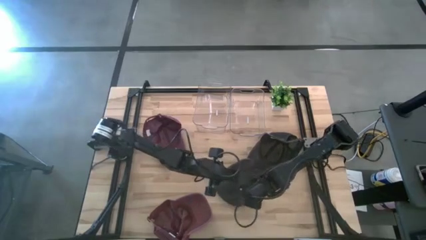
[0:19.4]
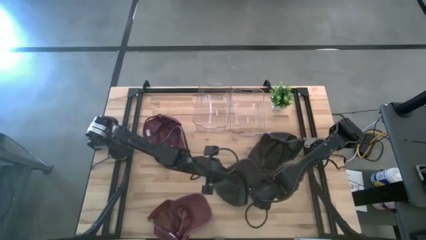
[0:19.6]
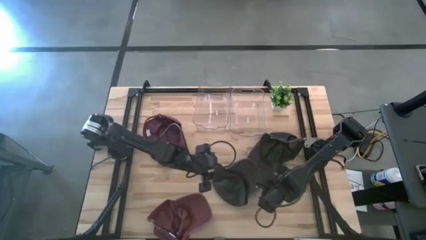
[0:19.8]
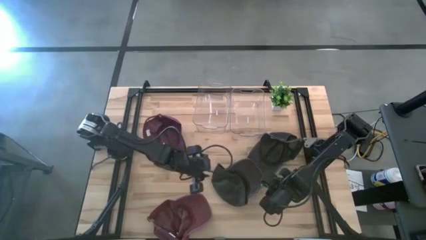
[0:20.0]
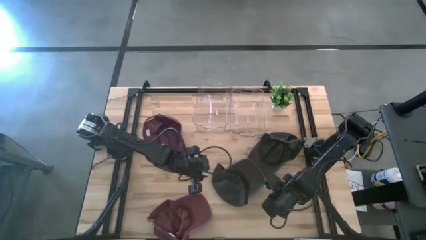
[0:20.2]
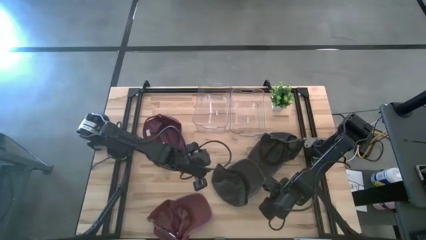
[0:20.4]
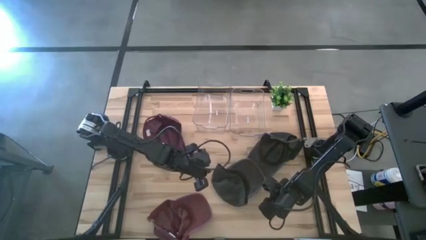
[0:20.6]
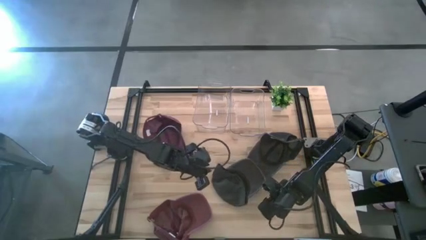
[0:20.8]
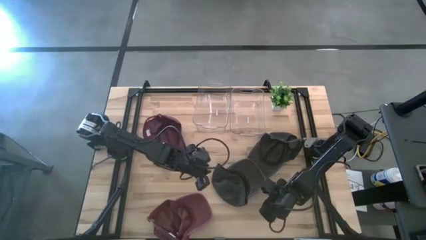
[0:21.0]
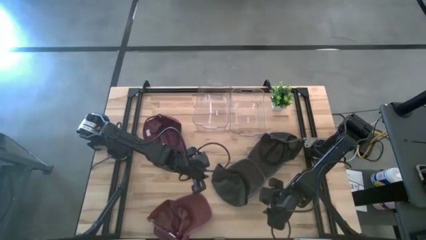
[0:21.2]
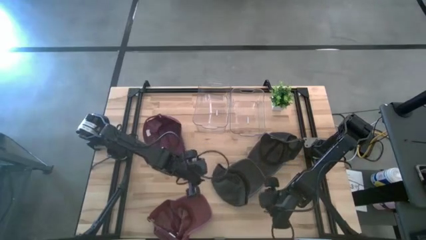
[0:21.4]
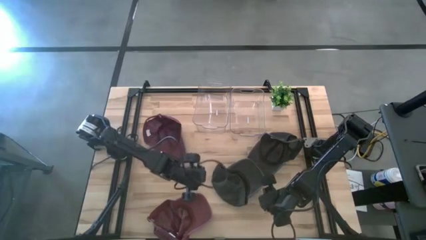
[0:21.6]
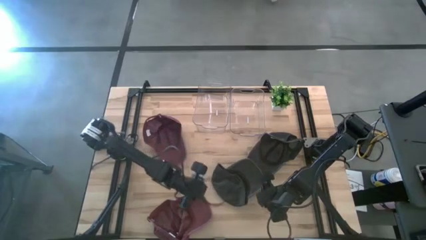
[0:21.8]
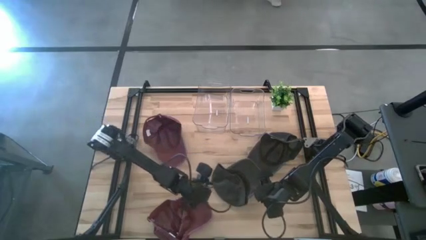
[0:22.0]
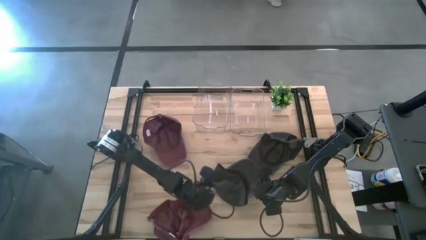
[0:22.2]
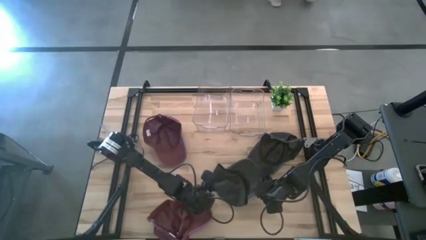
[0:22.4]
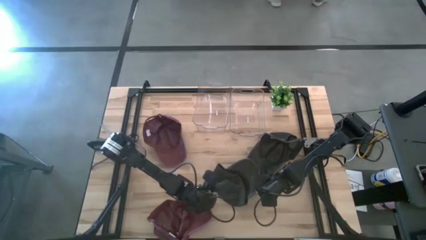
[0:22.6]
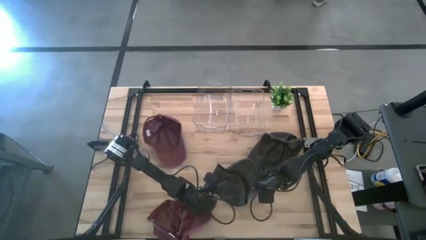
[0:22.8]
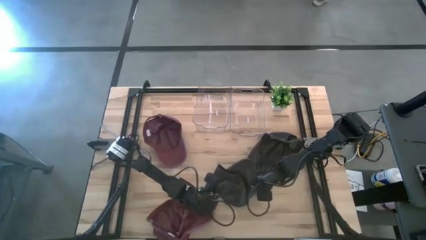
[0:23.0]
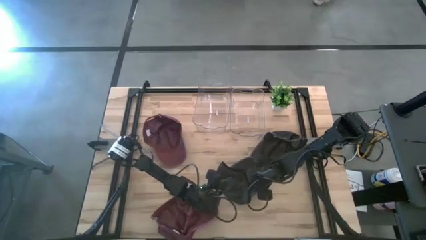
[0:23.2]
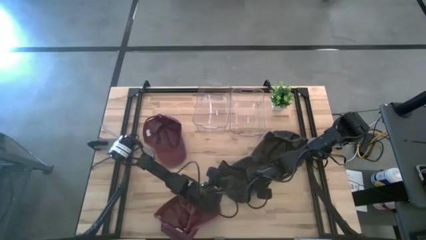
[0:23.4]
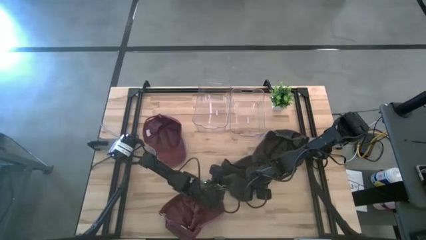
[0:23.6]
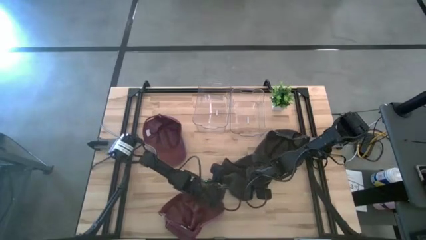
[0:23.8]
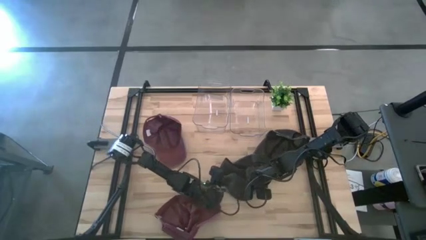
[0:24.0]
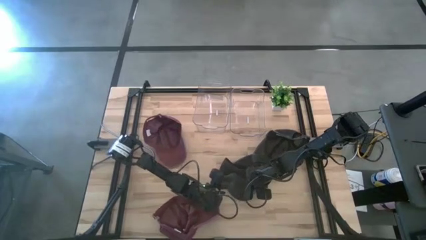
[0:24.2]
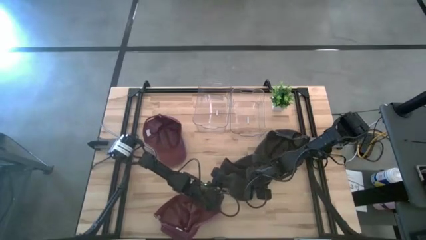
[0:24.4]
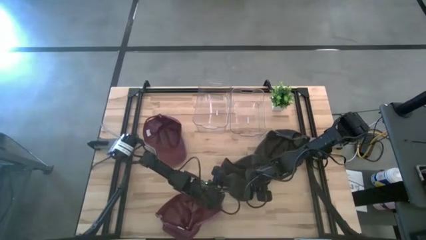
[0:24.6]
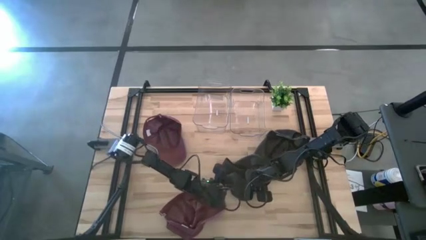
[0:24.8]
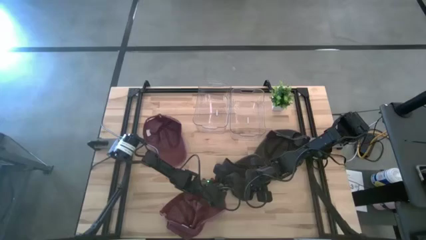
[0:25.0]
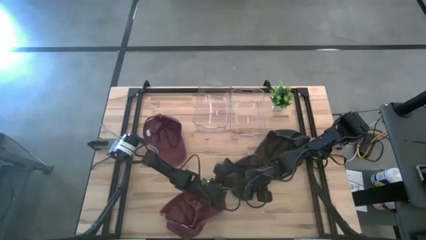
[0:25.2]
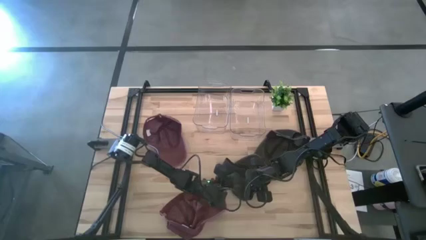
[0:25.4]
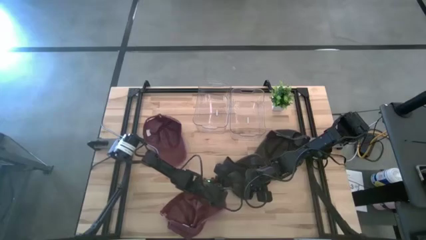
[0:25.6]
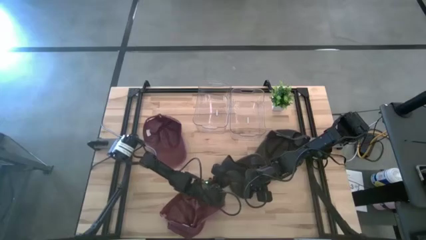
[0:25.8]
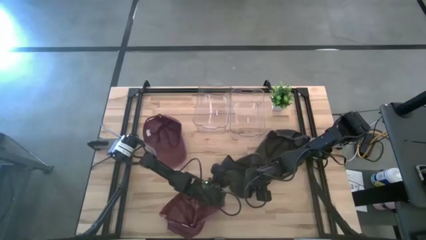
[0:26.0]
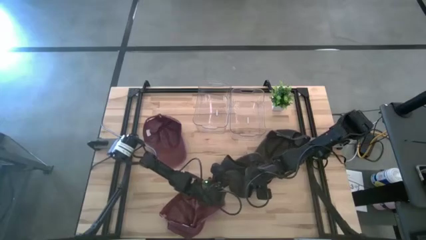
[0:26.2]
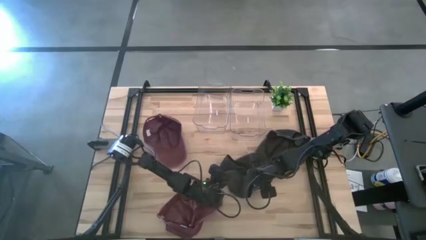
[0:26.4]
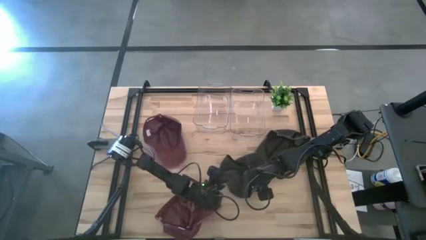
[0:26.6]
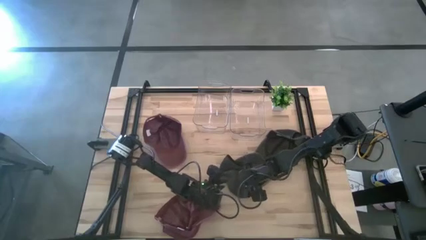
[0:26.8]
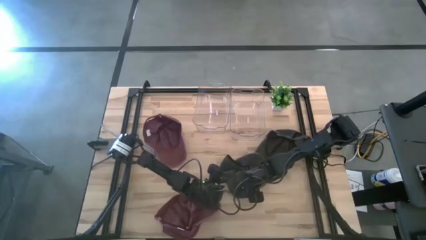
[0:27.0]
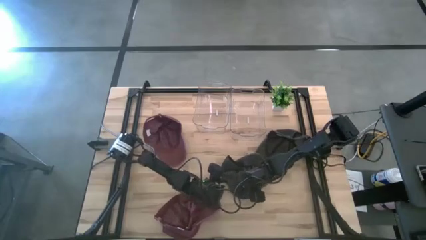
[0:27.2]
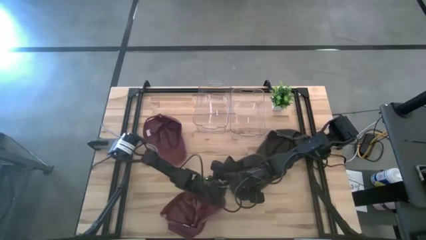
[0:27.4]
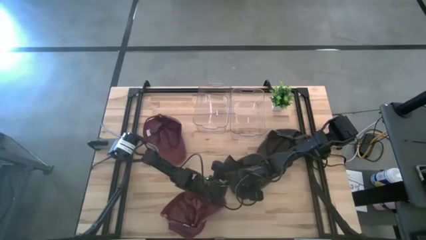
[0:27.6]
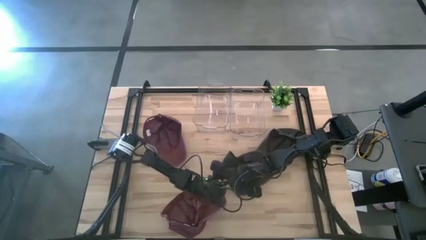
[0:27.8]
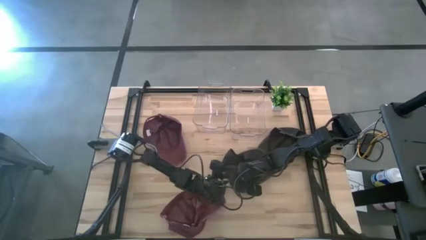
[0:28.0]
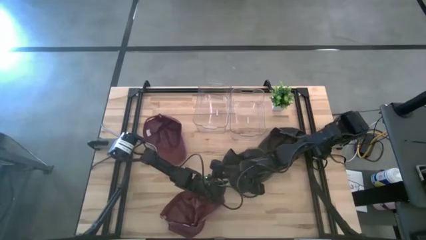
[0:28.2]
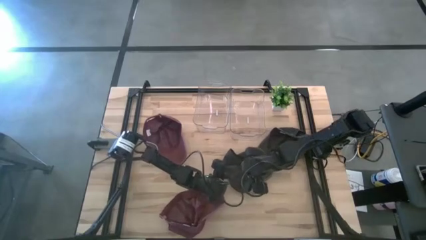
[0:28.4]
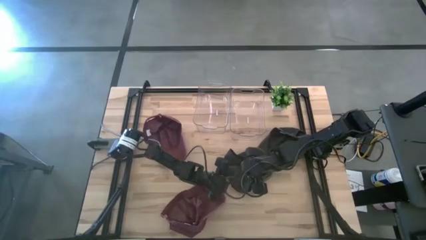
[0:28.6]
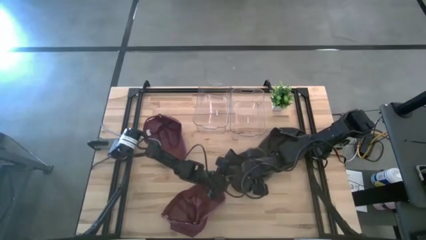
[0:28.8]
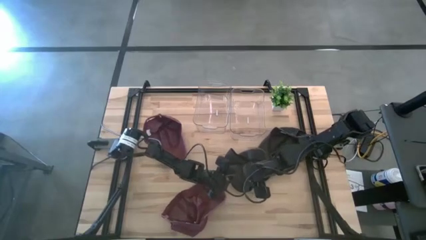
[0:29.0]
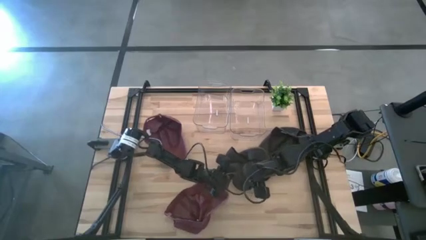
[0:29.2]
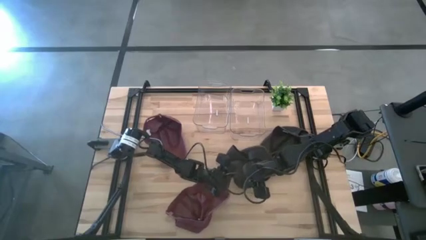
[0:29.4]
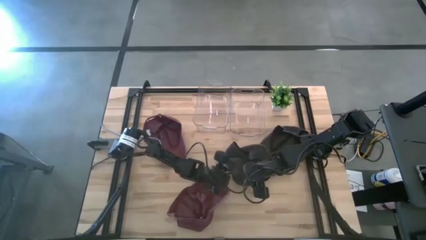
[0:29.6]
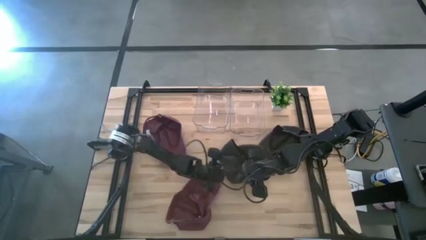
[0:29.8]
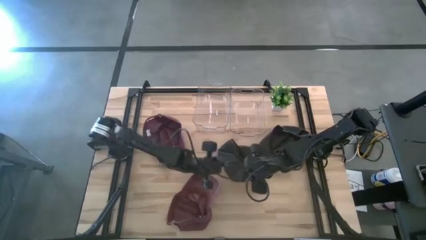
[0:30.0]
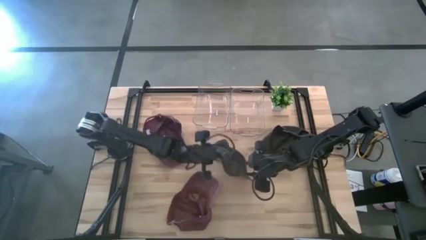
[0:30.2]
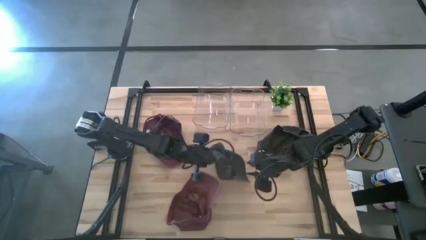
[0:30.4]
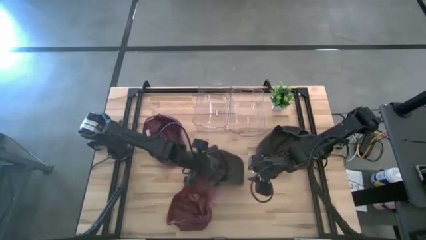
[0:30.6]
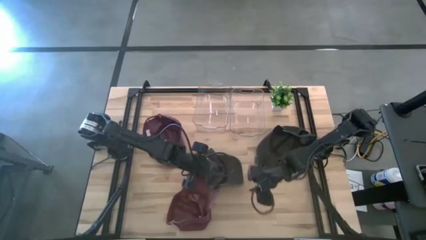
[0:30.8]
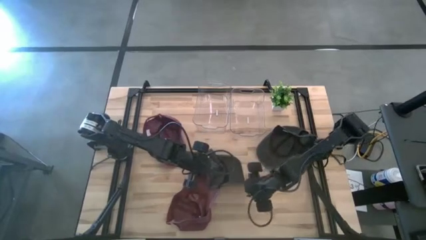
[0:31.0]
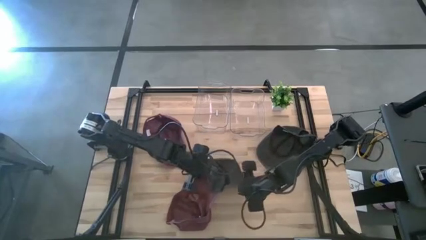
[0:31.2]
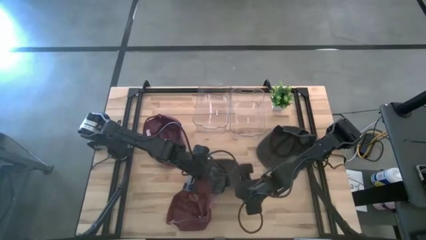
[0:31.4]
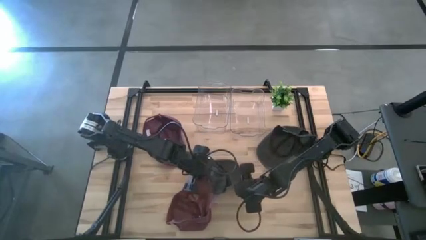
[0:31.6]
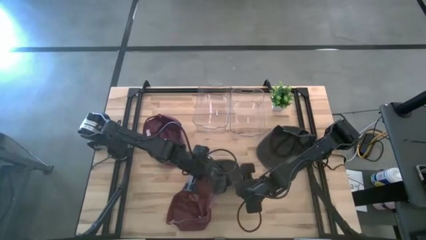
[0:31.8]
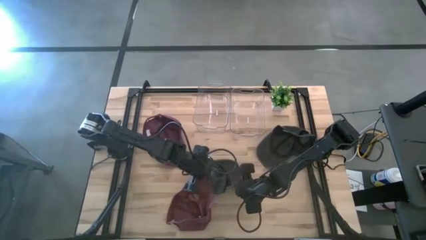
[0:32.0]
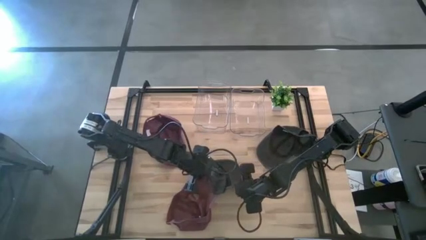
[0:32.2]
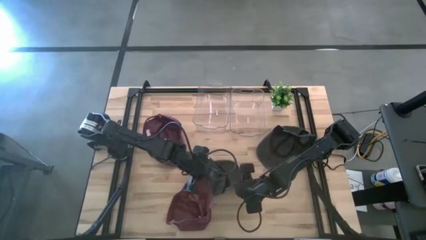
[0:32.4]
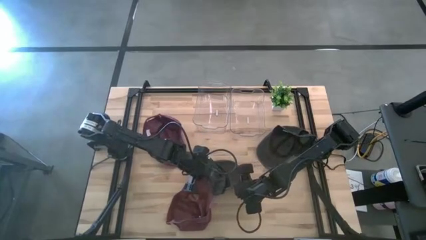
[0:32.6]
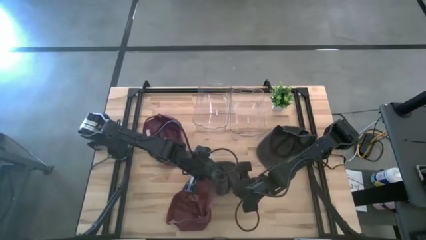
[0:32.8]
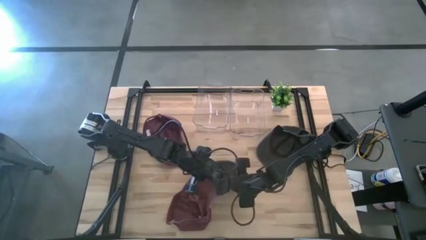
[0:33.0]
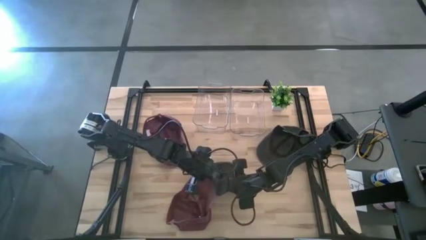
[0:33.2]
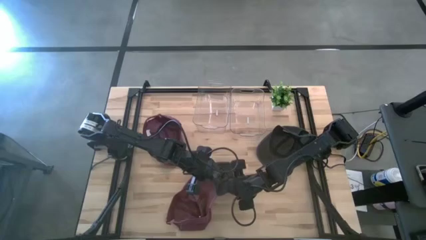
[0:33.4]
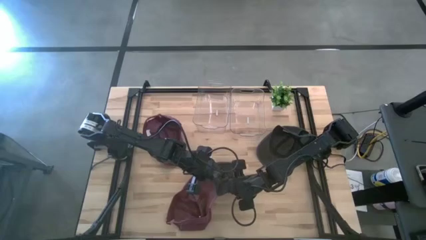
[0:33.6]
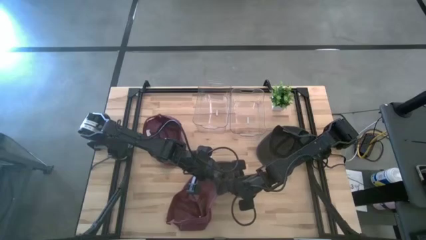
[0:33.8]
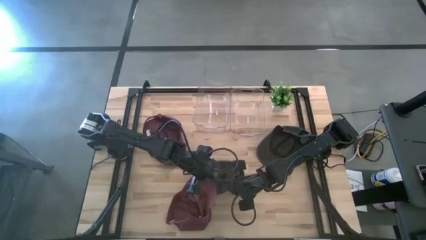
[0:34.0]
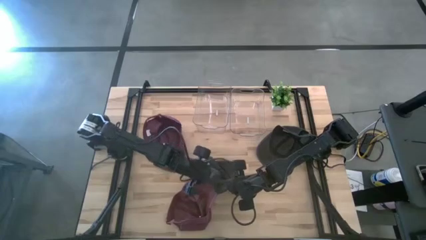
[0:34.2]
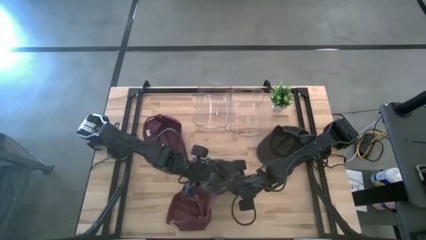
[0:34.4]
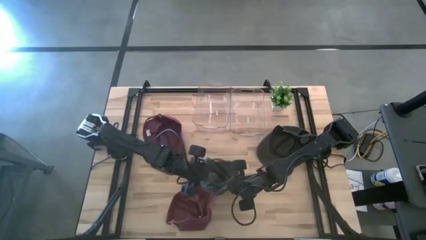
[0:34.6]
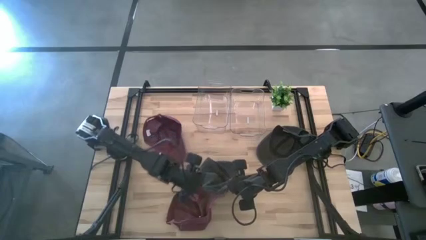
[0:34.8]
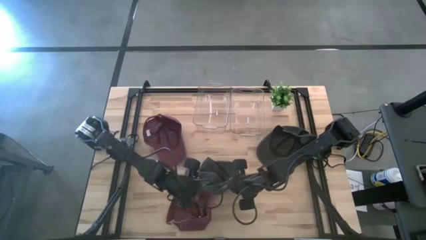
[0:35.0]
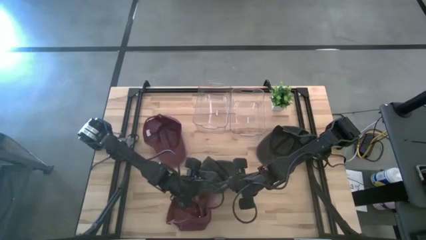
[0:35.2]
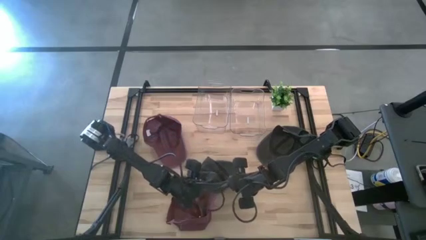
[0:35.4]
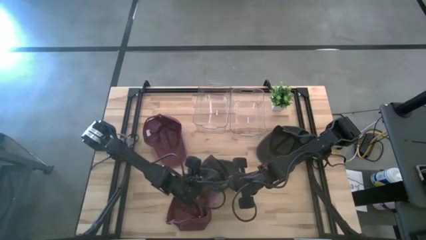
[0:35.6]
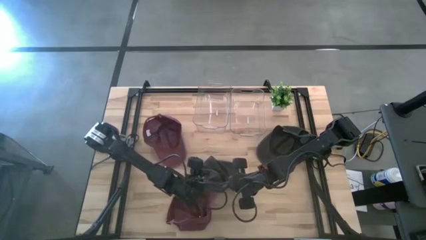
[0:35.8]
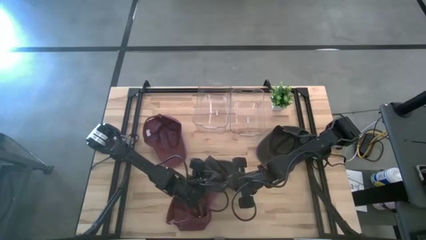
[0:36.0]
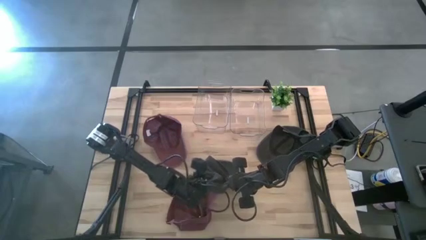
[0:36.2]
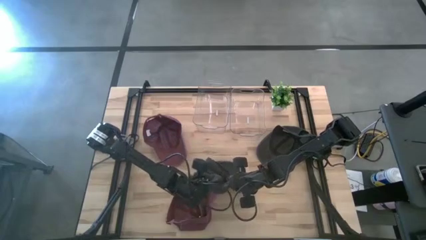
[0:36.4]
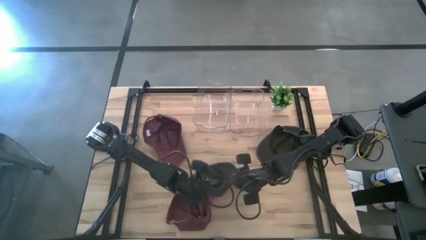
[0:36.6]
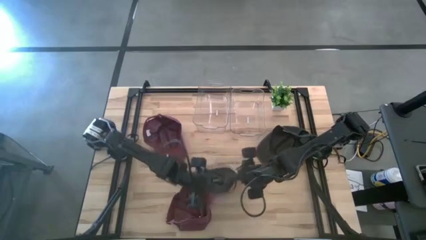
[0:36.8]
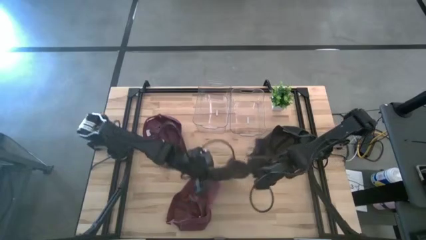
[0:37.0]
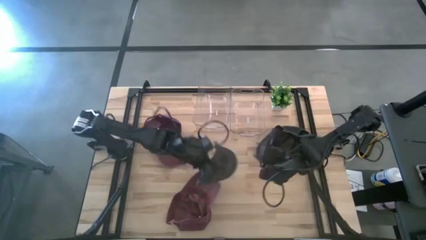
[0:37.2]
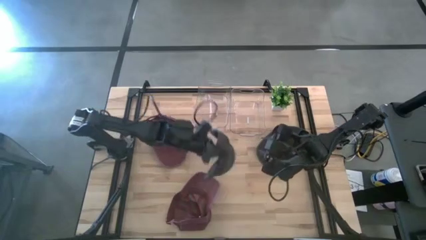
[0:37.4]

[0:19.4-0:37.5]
Task: Pick & Place hat
Put the left black cap into the left transparent bin
